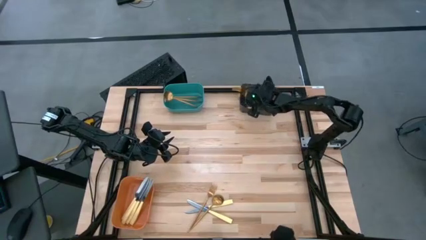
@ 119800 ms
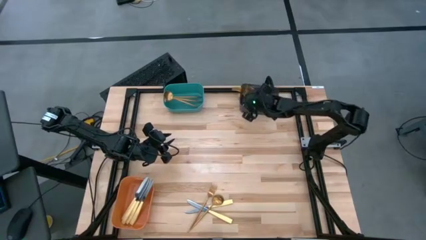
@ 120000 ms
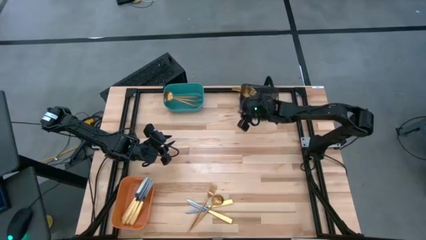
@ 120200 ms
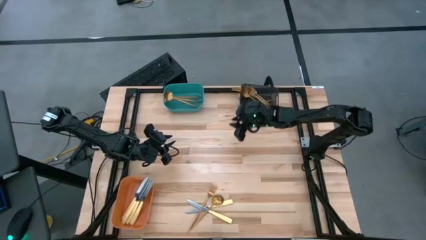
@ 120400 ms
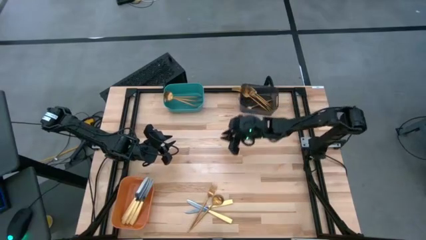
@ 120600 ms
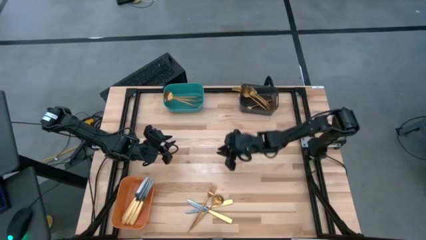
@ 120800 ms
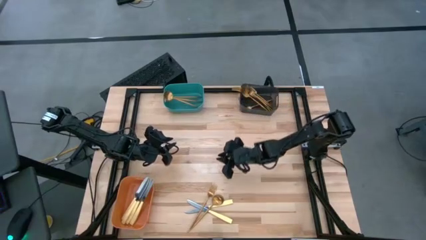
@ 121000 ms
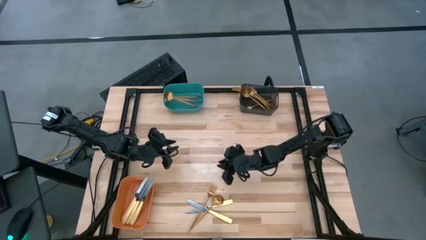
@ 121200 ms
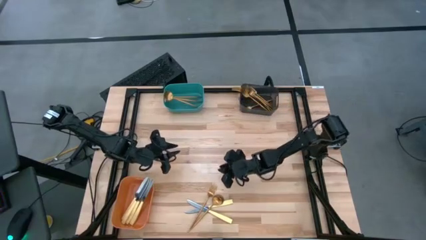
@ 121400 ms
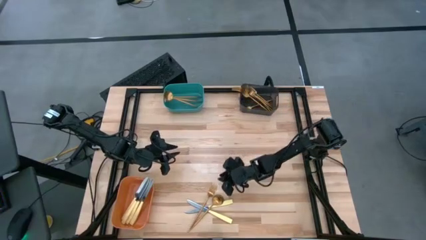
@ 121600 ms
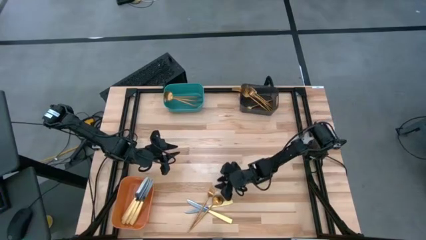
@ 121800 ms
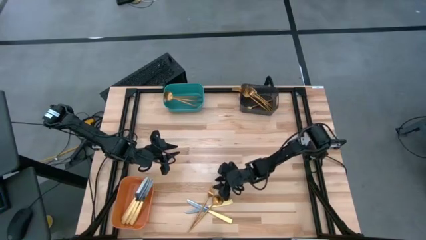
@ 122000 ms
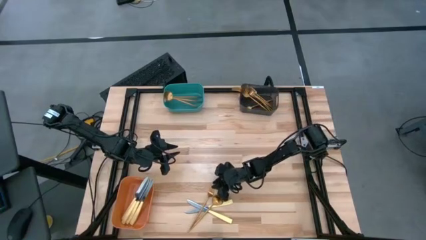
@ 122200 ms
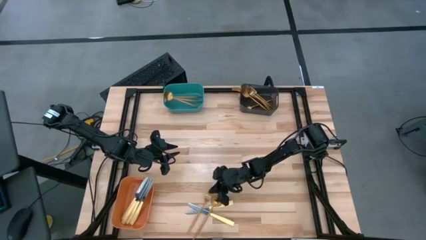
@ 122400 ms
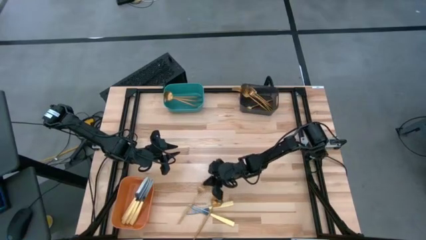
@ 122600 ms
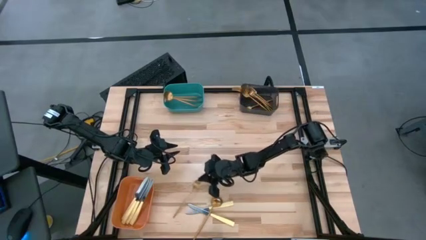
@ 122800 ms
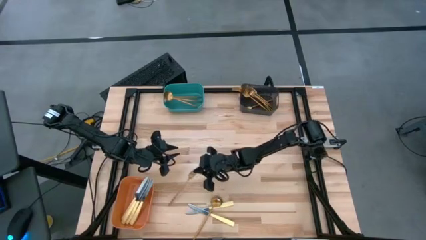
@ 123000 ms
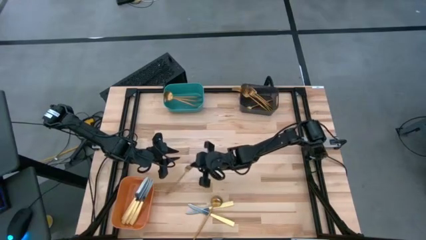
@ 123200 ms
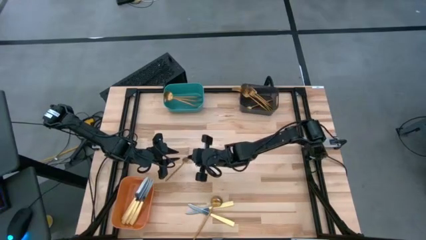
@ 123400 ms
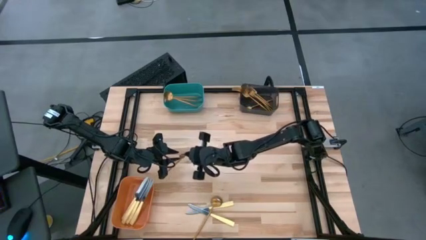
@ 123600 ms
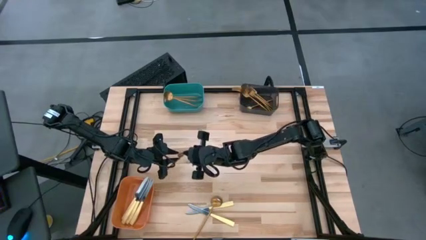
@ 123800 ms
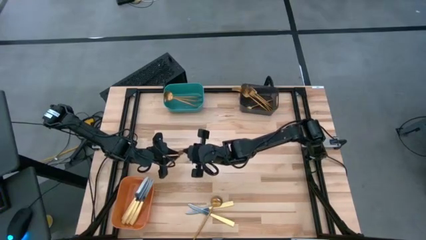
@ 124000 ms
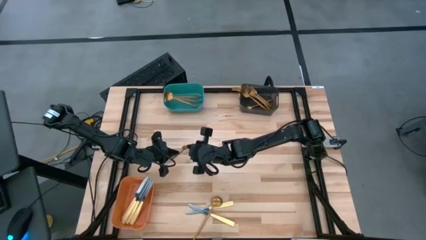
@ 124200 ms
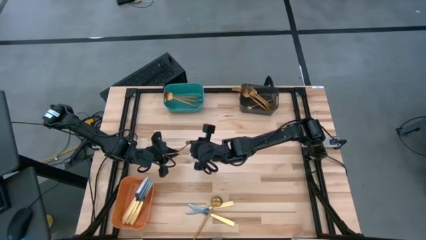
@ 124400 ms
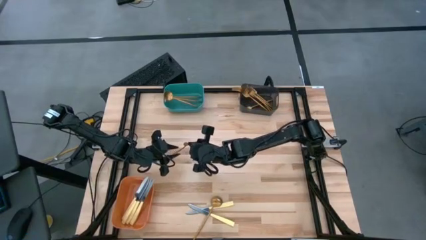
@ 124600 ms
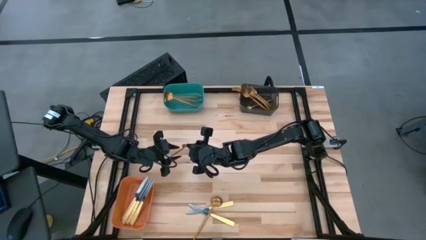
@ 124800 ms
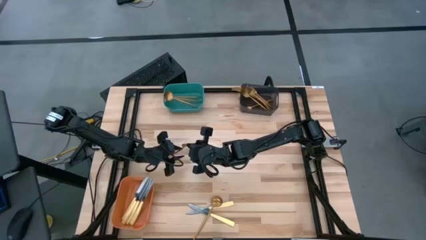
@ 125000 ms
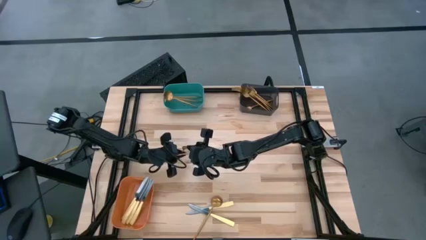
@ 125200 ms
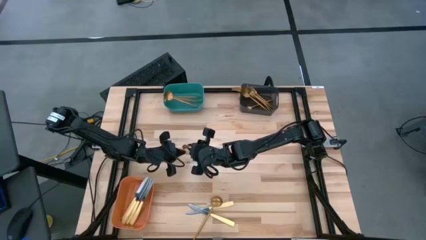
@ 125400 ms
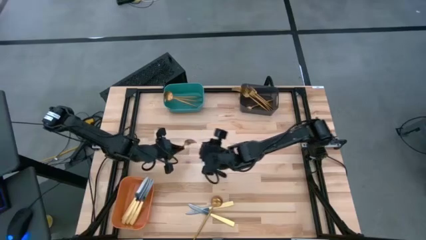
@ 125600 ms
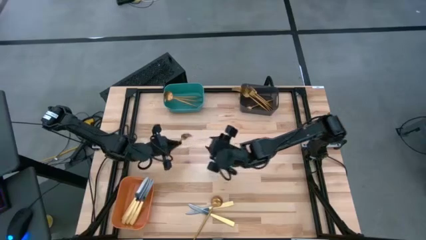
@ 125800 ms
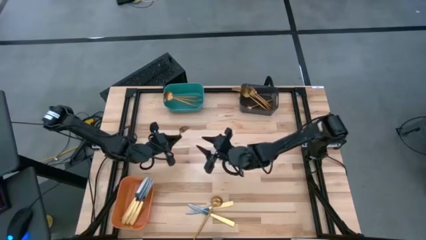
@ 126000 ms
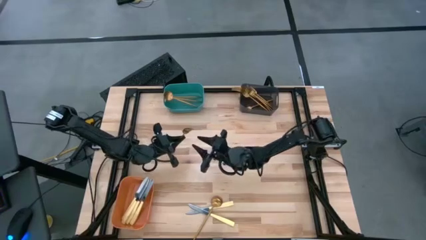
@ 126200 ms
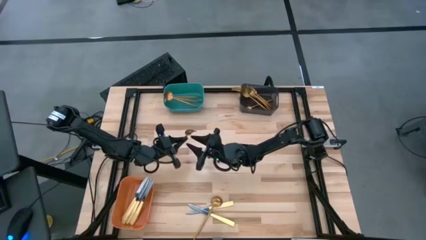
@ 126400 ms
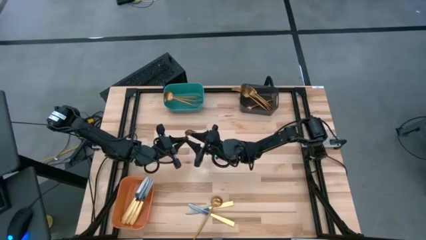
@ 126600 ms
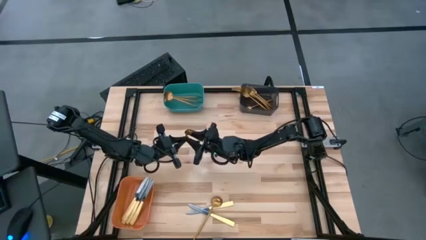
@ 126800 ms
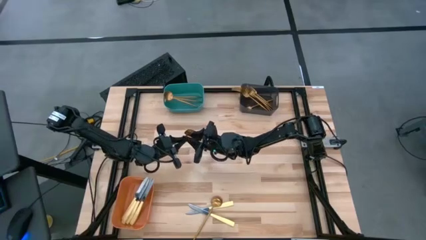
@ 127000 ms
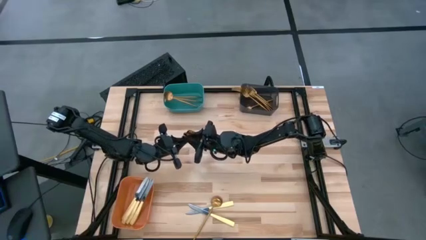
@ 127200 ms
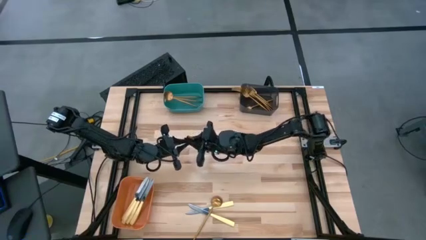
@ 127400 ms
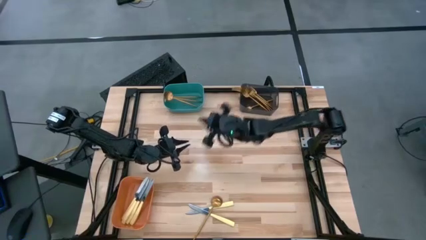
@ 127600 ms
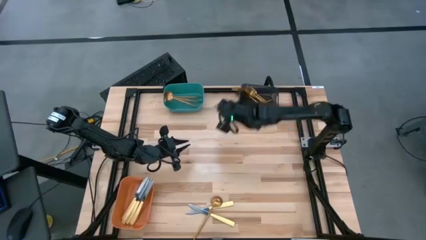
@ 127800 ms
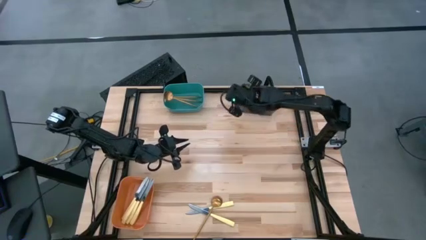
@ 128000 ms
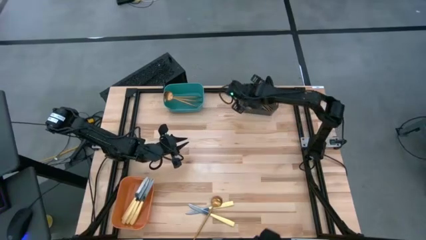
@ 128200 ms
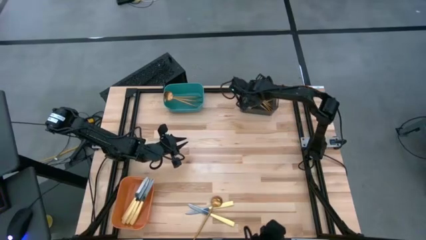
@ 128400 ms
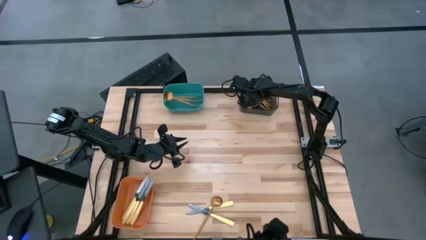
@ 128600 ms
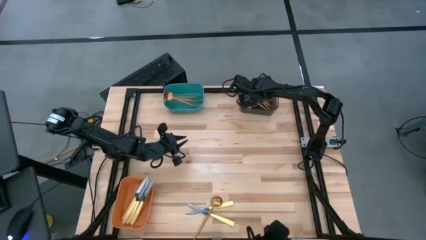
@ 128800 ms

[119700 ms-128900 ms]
Task: Sort silverware by color (type)
Put the gold fork into the black bin
